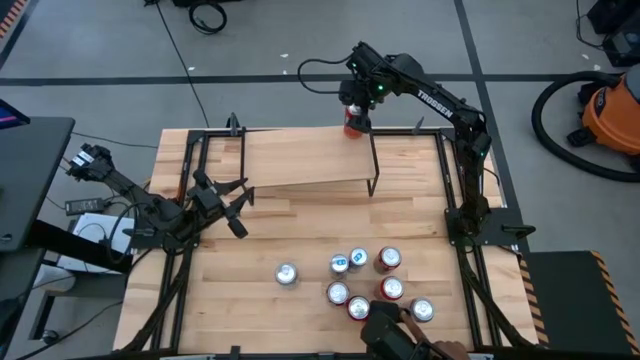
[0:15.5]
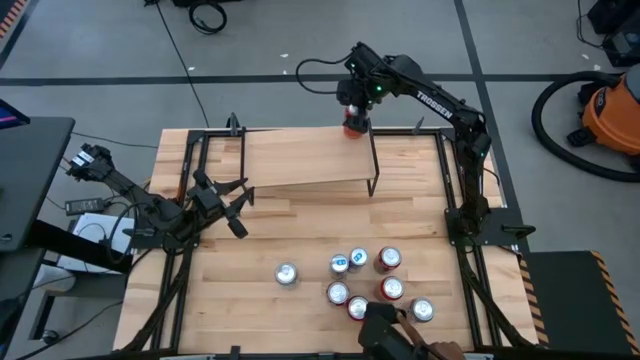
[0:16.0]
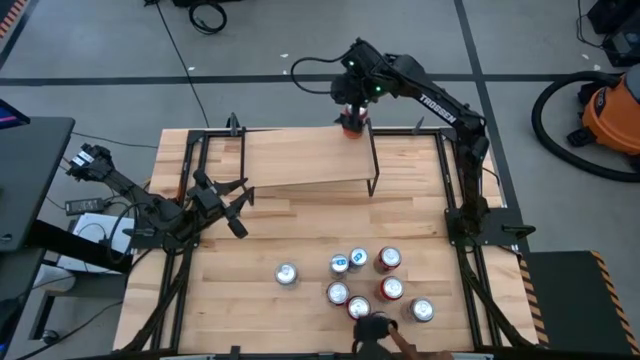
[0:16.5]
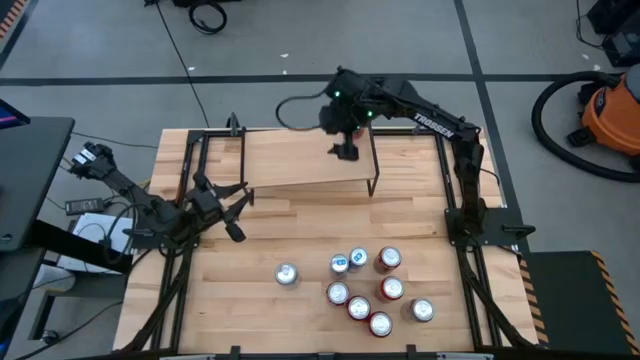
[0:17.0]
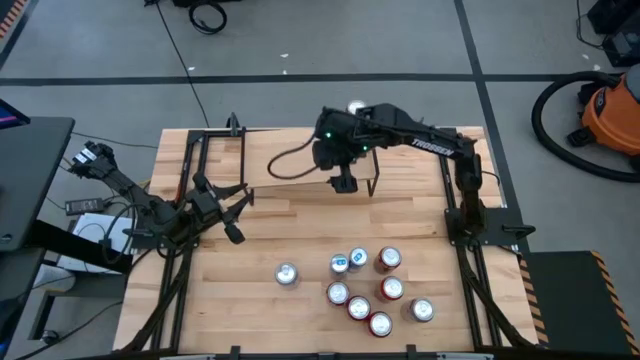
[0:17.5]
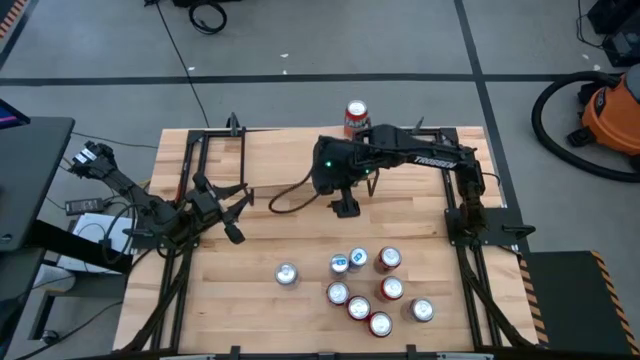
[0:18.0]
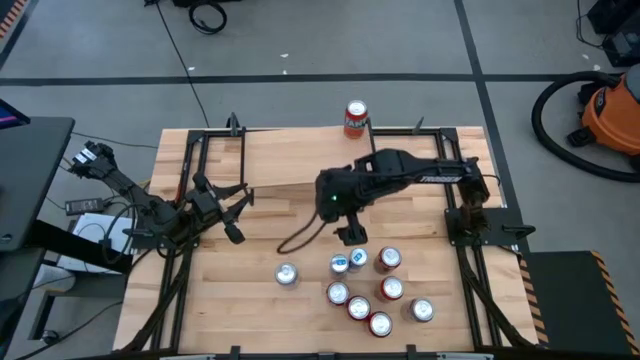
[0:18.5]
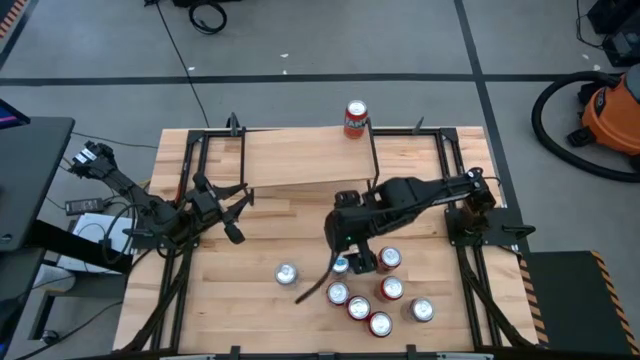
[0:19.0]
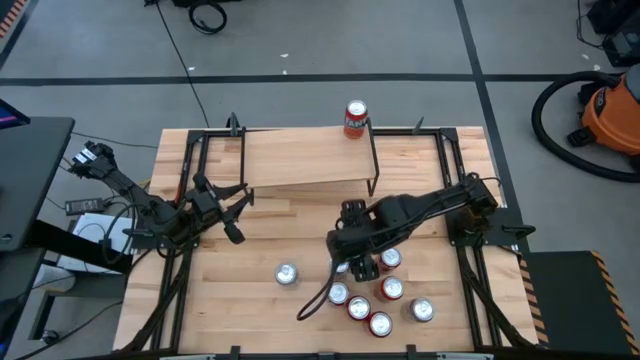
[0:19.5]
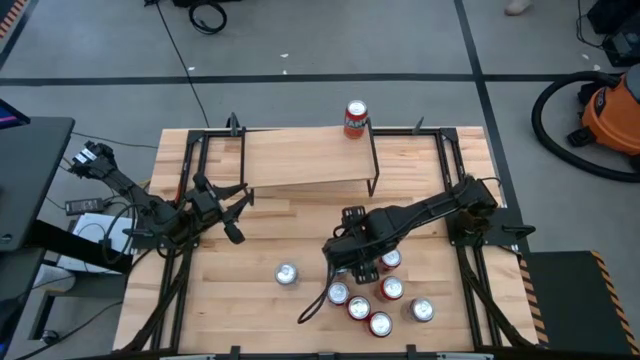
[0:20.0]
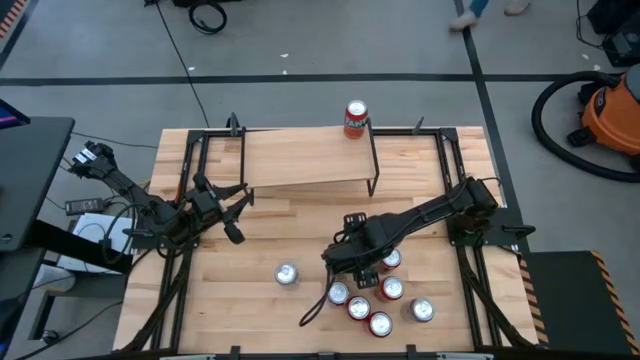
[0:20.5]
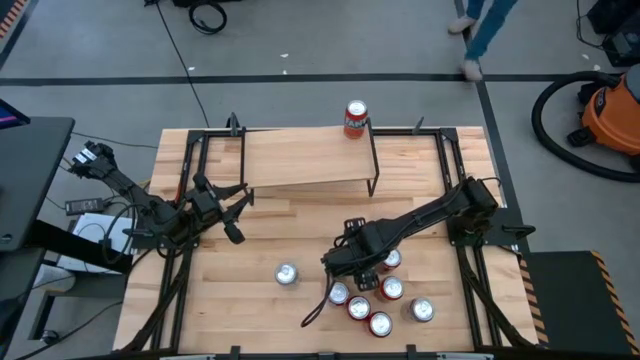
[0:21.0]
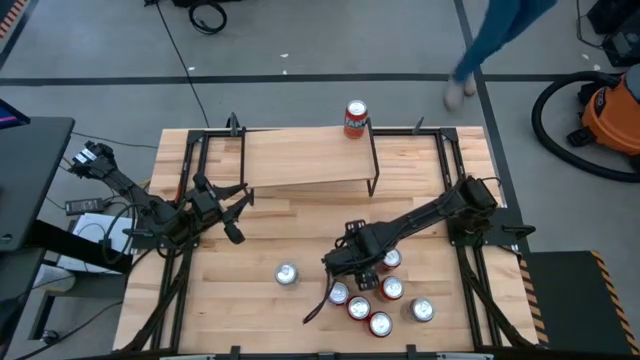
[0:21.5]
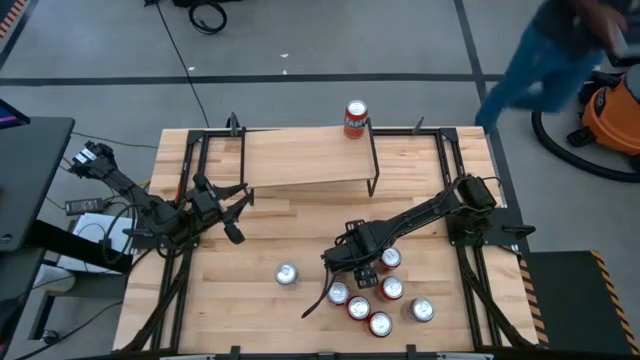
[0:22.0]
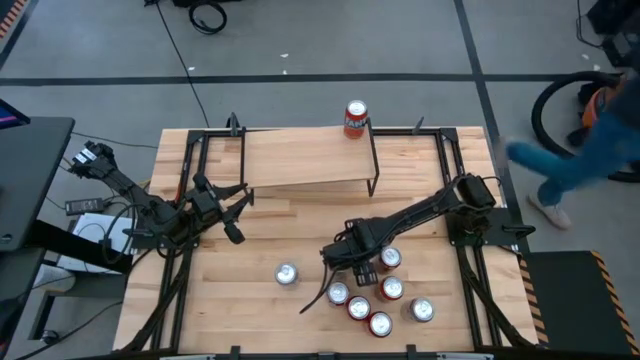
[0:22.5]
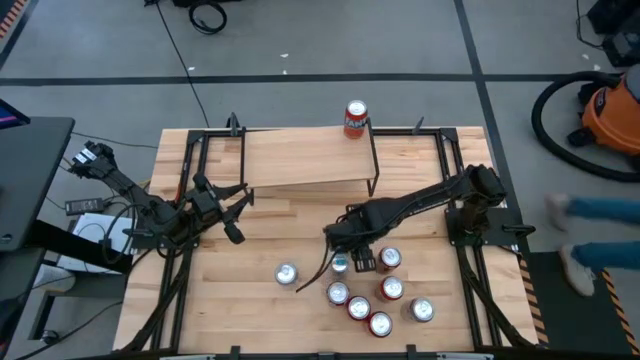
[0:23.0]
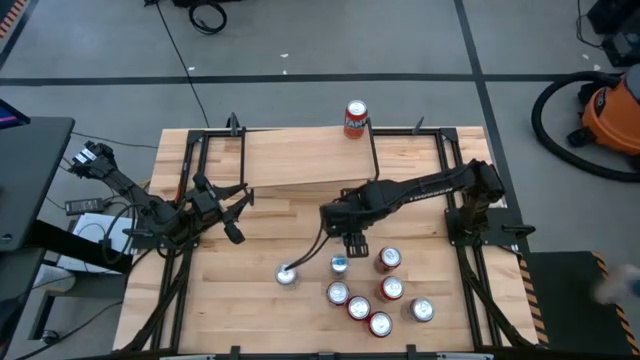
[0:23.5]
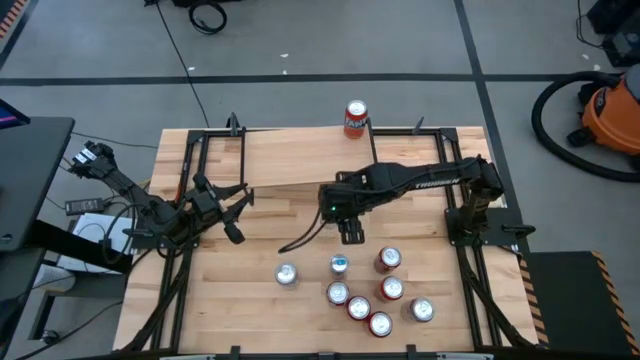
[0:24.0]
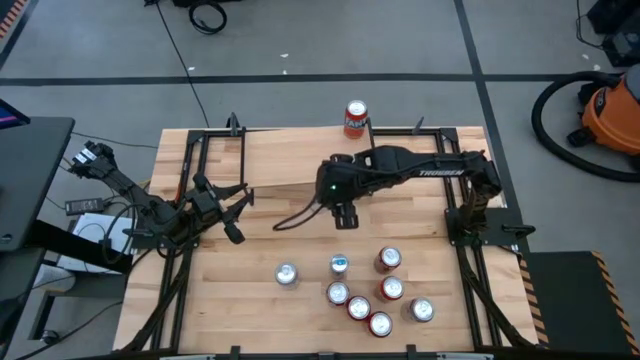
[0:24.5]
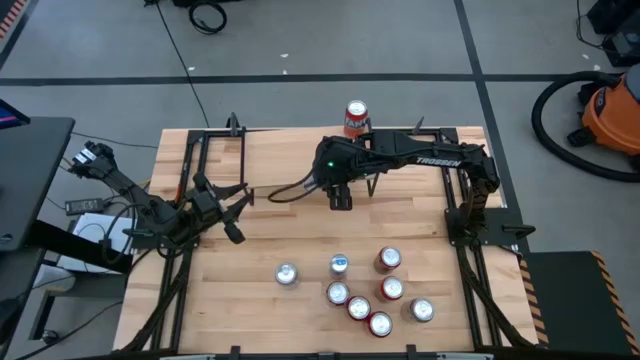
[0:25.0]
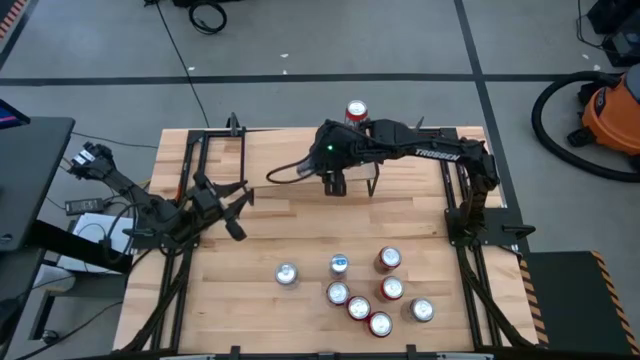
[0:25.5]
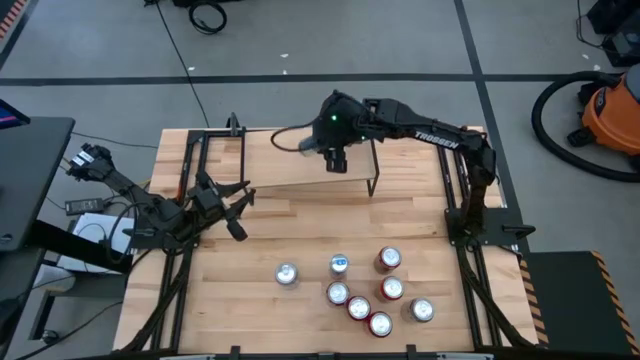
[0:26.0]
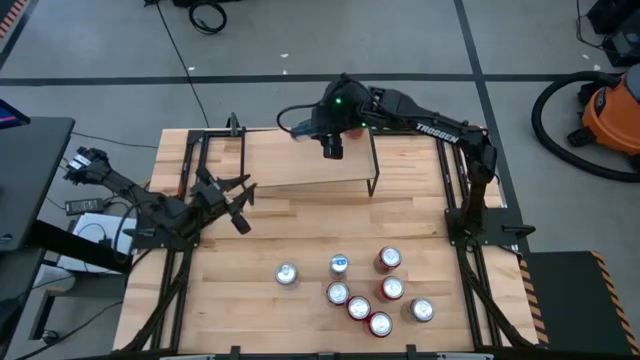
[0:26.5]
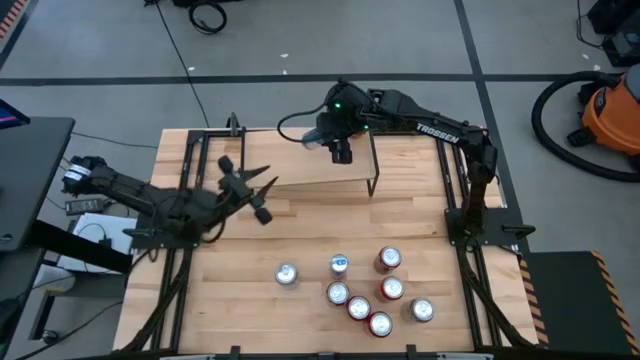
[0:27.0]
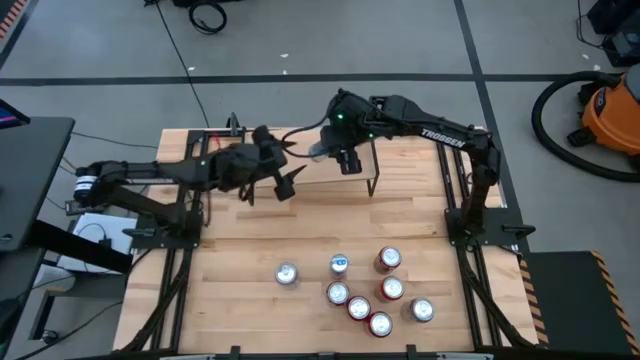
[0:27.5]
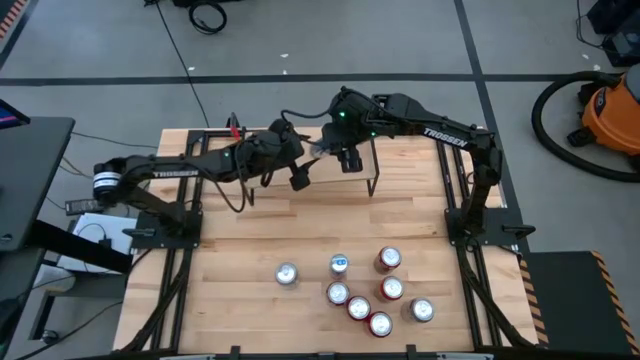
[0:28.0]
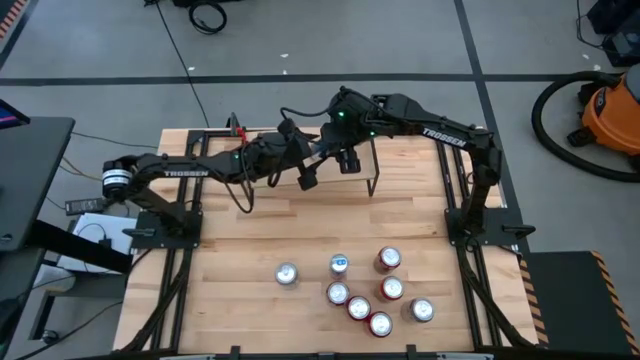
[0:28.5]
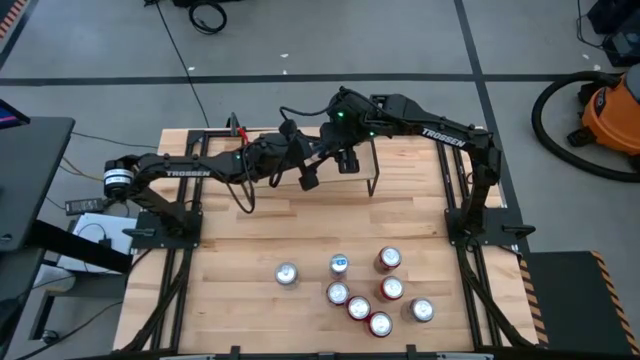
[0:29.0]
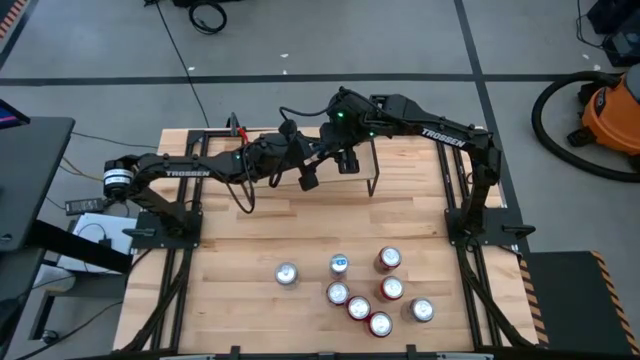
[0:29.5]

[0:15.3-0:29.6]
Task: Place canned beverage on shelf
Put the right blue soda can on the shelf

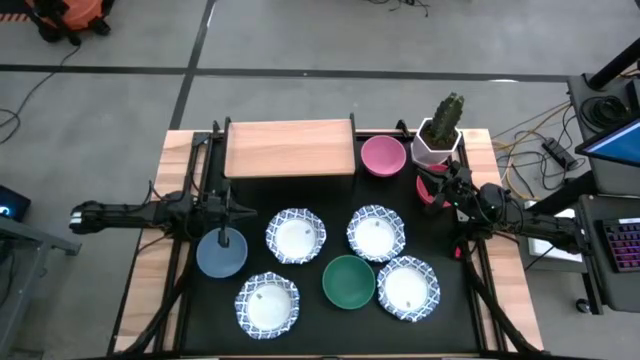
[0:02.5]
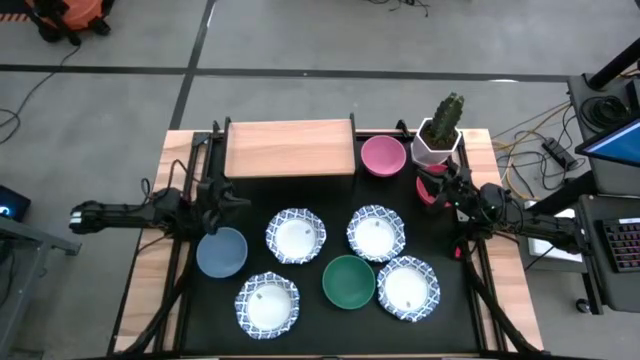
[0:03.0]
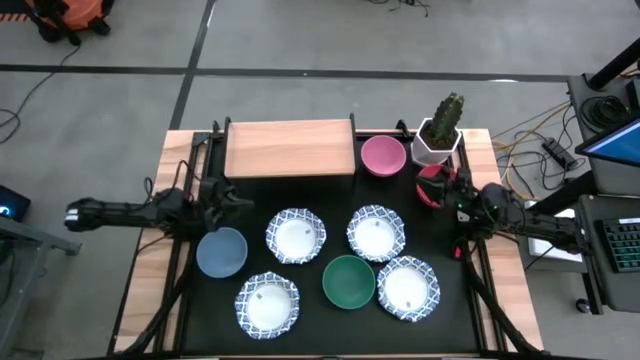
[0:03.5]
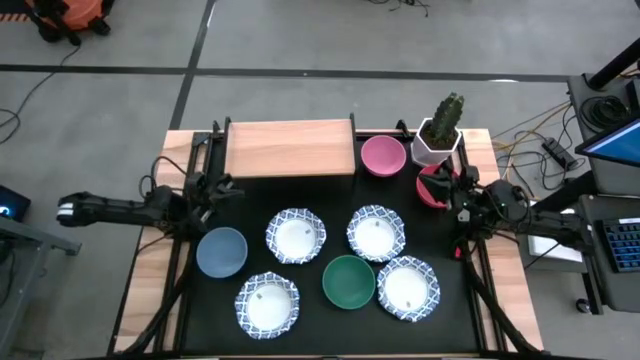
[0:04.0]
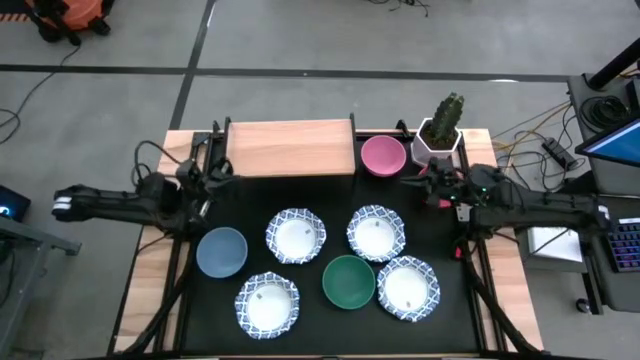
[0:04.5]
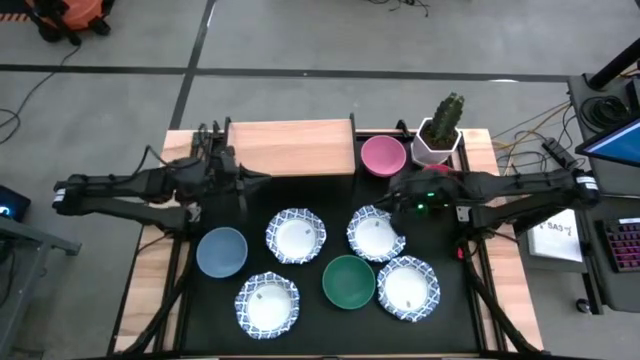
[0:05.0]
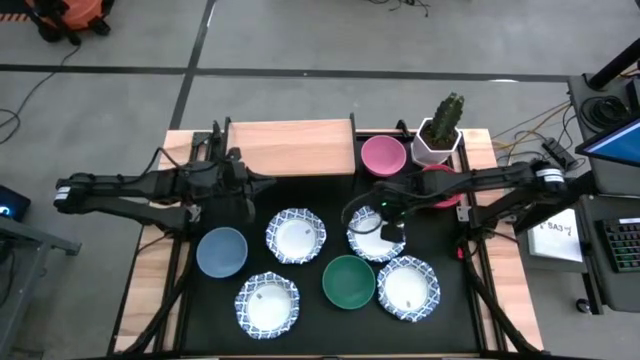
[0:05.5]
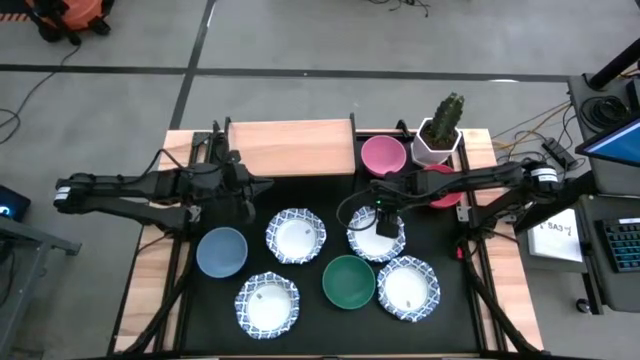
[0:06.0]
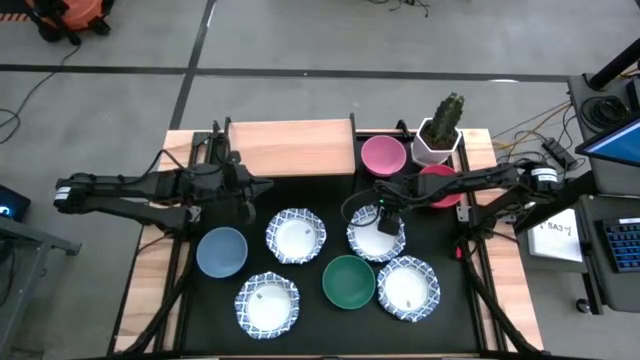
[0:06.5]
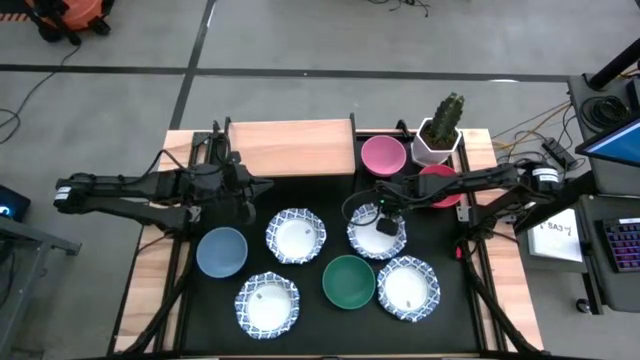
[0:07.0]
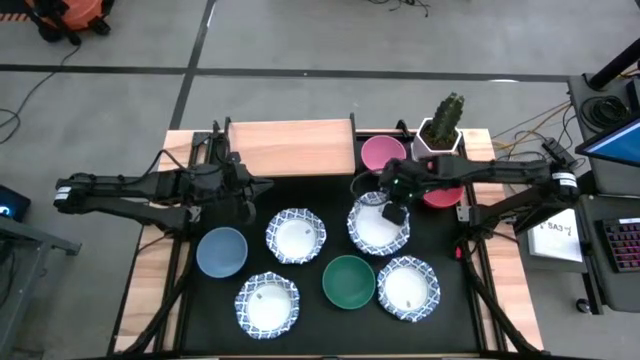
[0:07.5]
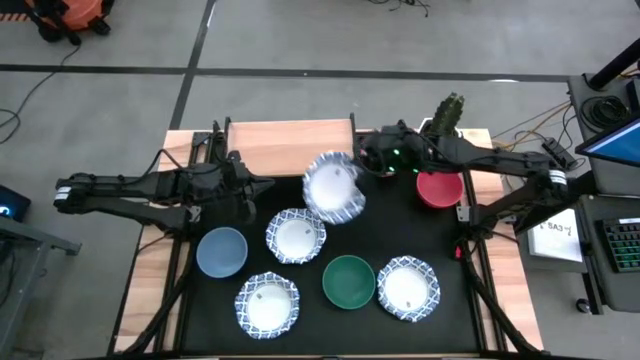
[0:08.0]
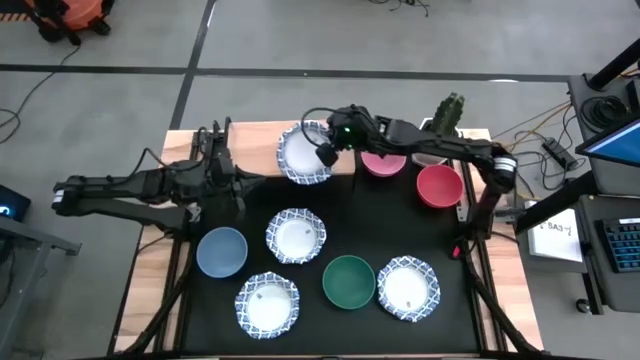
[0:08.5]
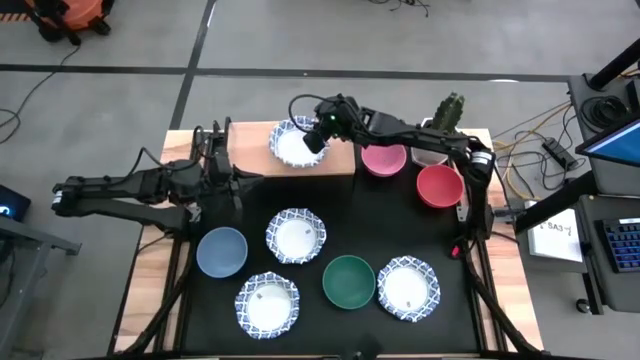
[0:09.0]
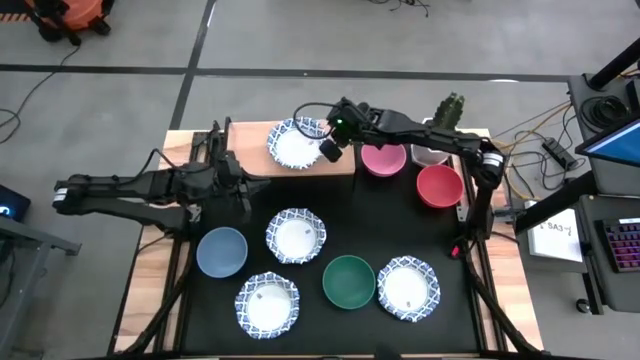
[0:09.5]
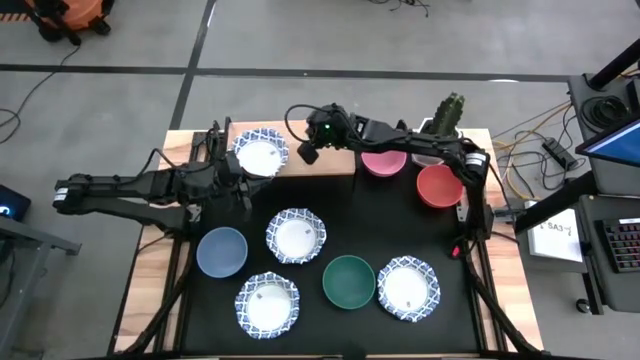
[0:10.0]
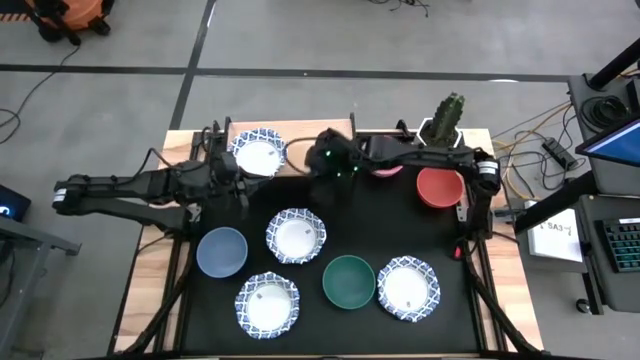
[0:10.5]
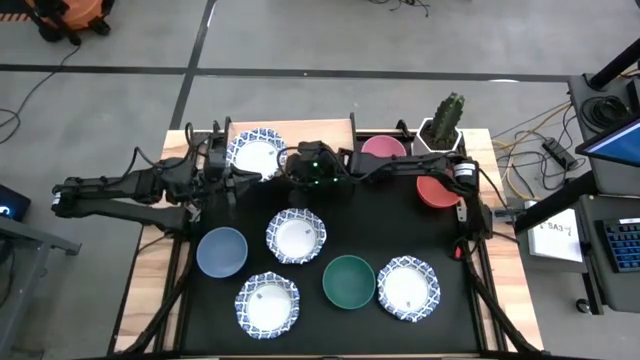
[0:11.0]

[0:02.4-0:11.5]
Task: Place and stack bowls onto a shelf
Put the white patterned bowl on the shelf
